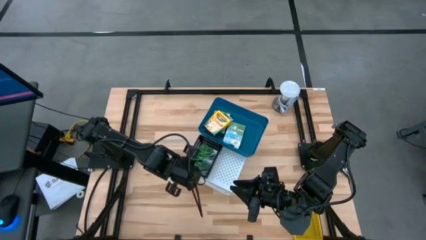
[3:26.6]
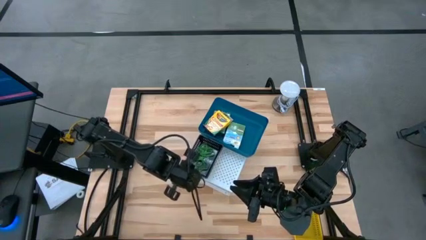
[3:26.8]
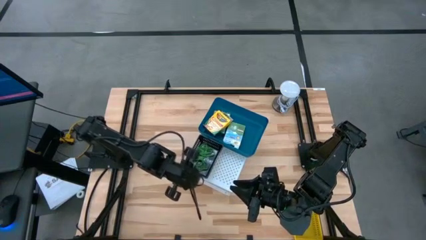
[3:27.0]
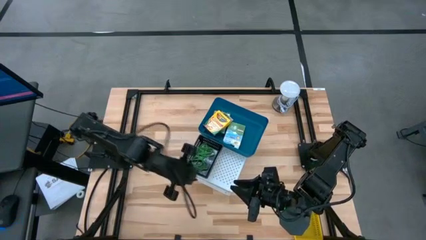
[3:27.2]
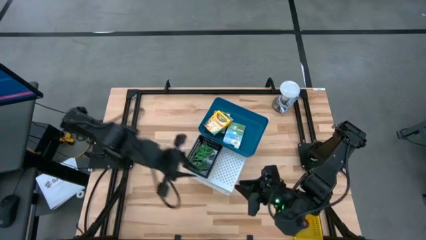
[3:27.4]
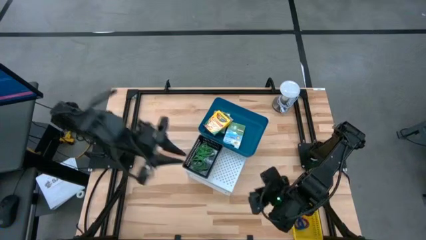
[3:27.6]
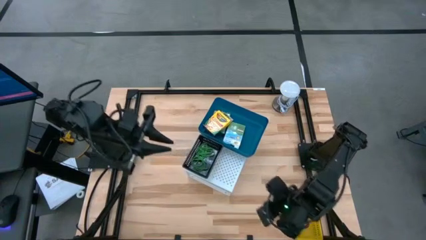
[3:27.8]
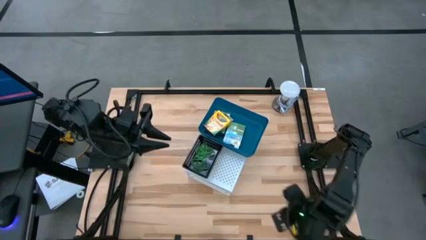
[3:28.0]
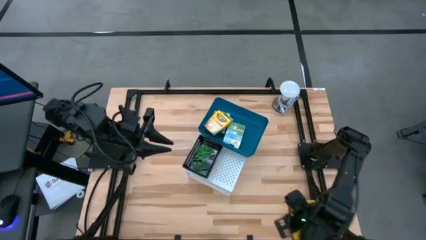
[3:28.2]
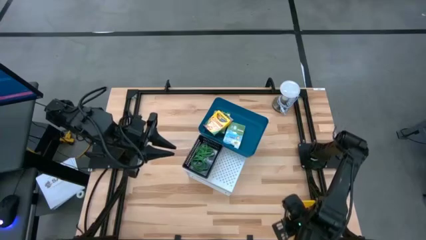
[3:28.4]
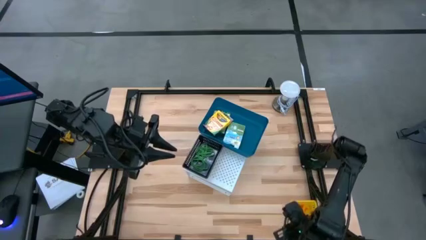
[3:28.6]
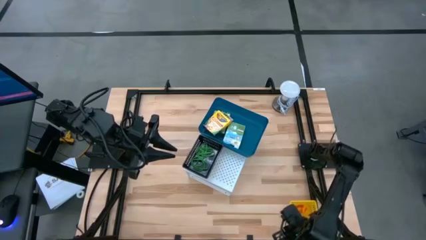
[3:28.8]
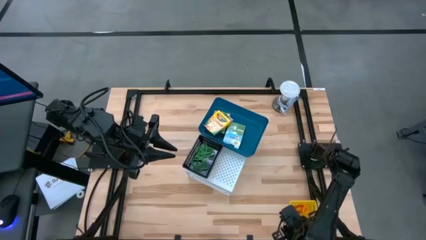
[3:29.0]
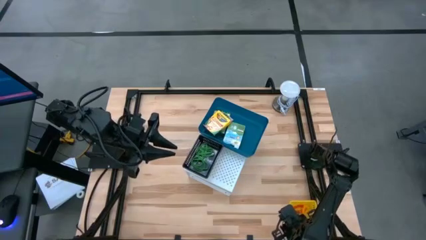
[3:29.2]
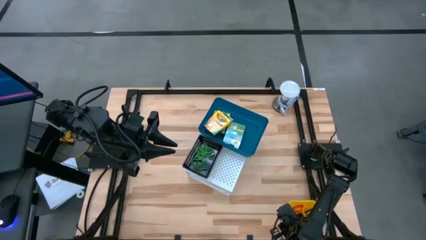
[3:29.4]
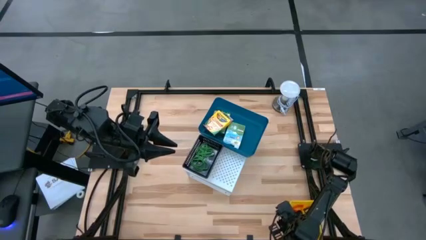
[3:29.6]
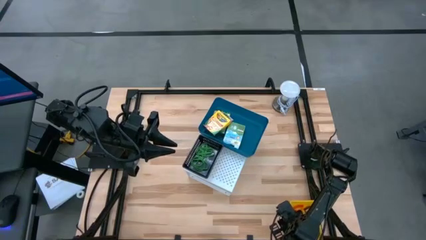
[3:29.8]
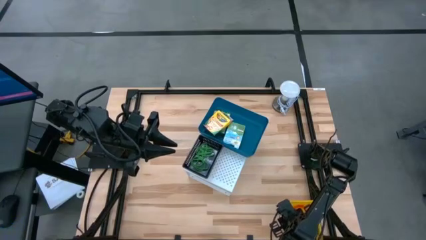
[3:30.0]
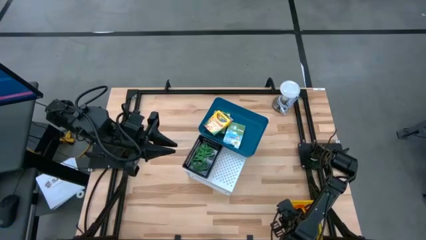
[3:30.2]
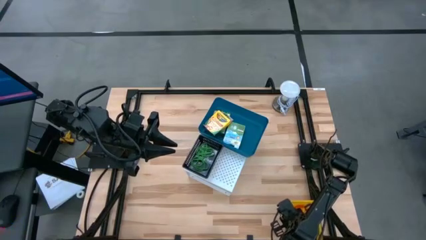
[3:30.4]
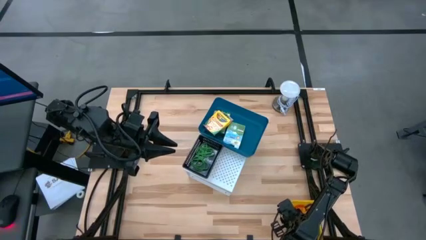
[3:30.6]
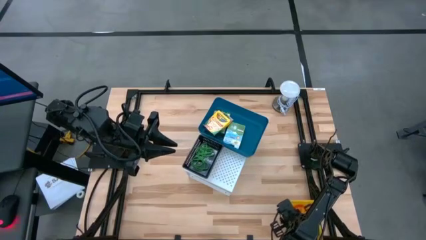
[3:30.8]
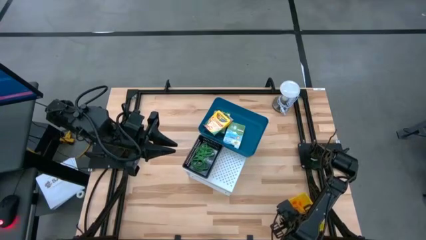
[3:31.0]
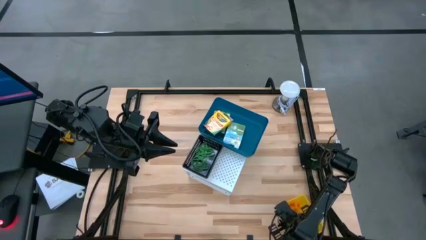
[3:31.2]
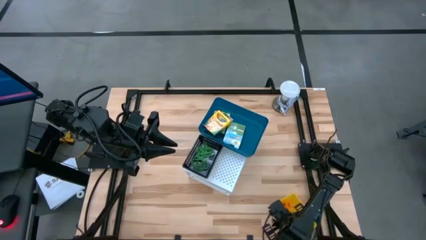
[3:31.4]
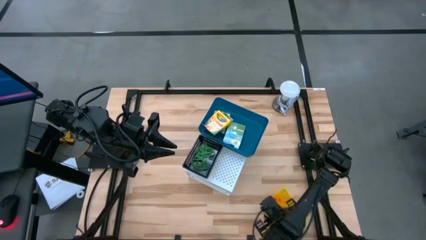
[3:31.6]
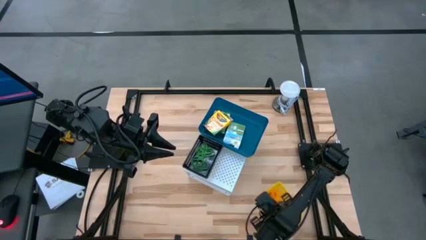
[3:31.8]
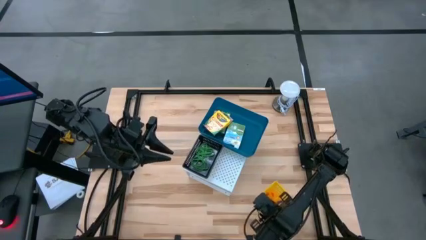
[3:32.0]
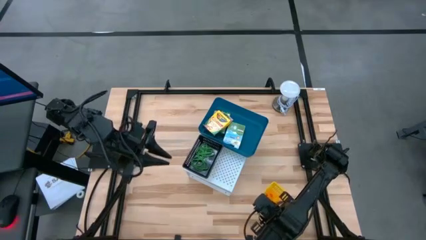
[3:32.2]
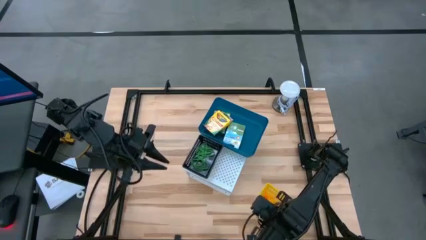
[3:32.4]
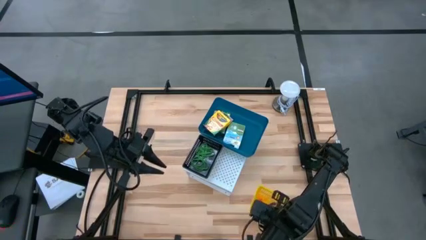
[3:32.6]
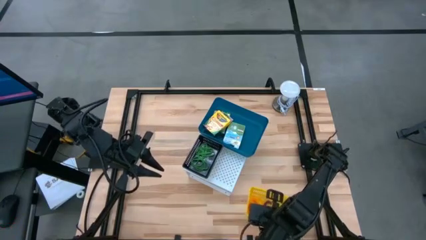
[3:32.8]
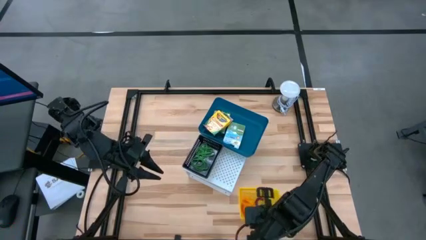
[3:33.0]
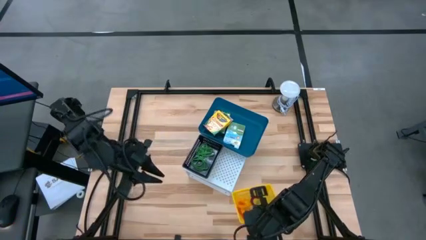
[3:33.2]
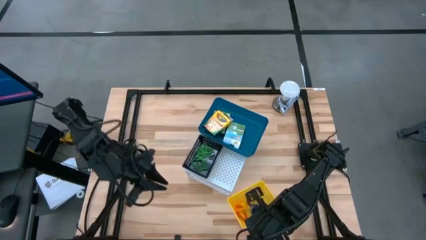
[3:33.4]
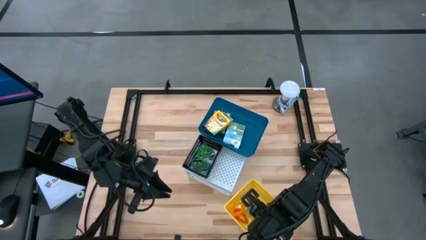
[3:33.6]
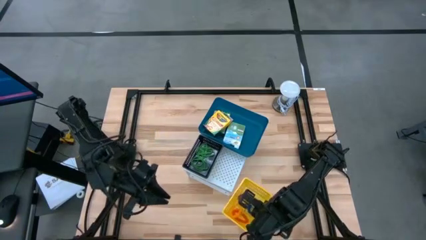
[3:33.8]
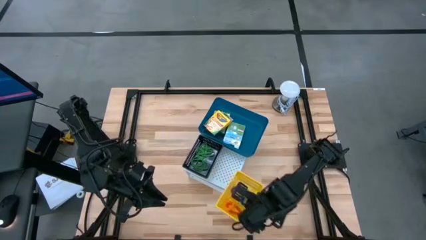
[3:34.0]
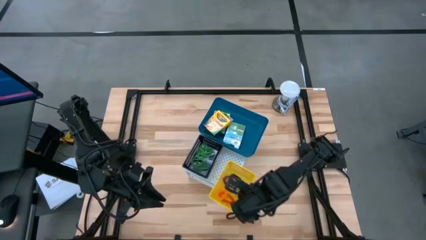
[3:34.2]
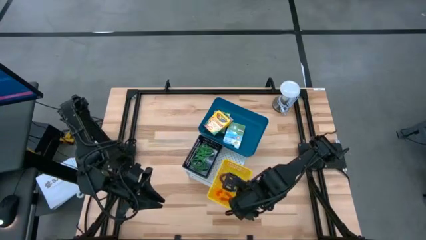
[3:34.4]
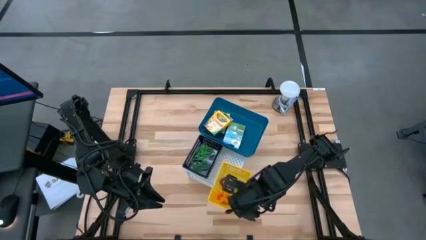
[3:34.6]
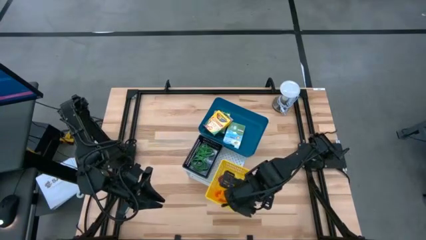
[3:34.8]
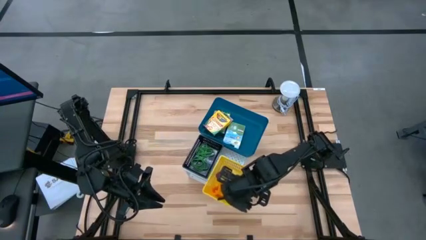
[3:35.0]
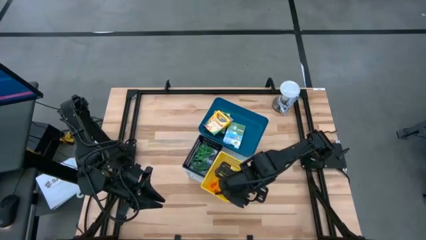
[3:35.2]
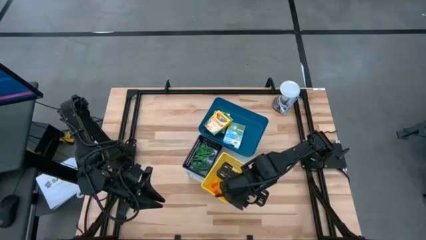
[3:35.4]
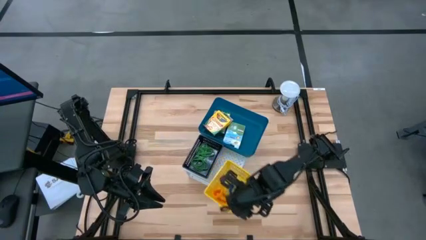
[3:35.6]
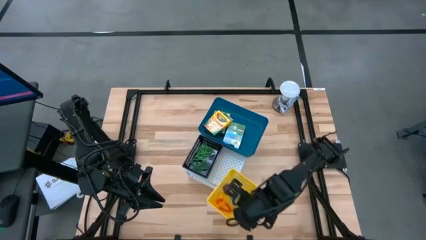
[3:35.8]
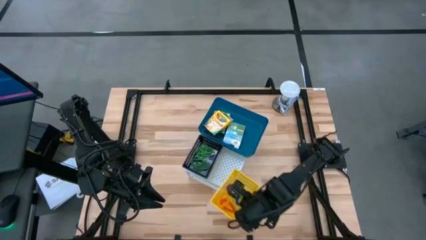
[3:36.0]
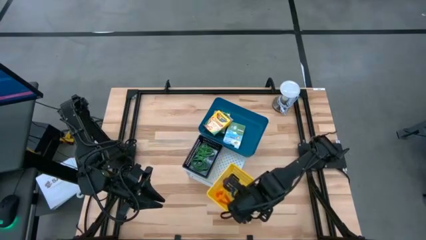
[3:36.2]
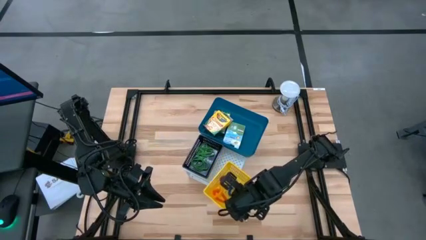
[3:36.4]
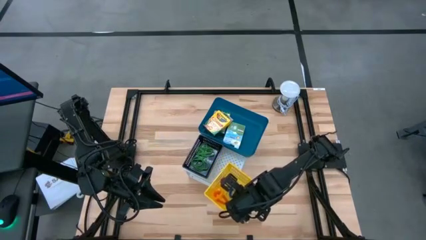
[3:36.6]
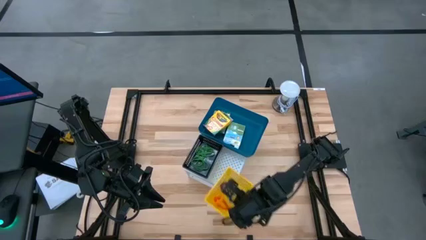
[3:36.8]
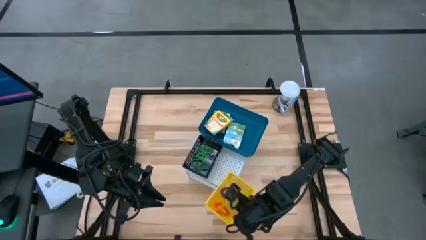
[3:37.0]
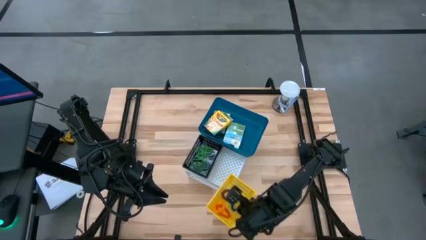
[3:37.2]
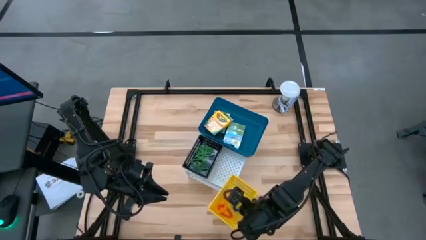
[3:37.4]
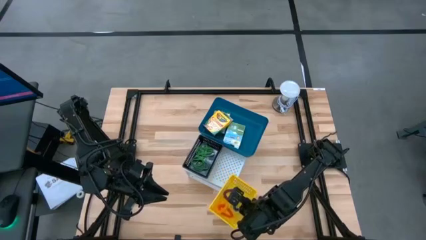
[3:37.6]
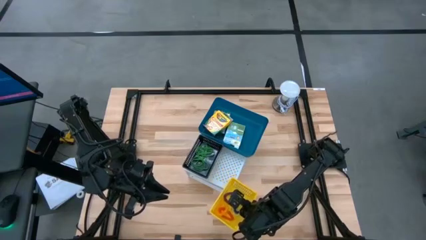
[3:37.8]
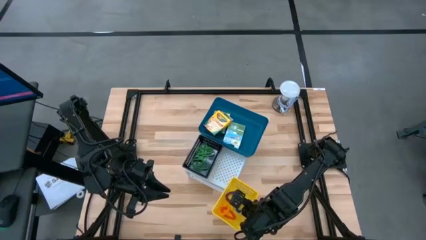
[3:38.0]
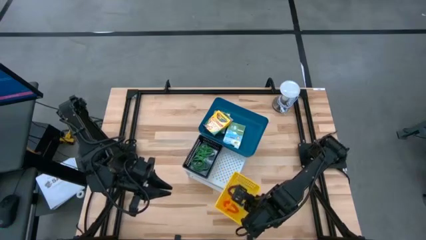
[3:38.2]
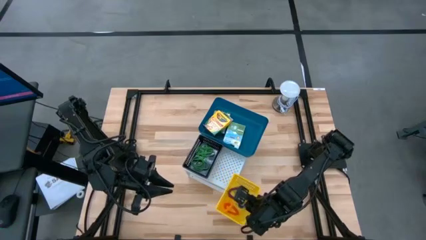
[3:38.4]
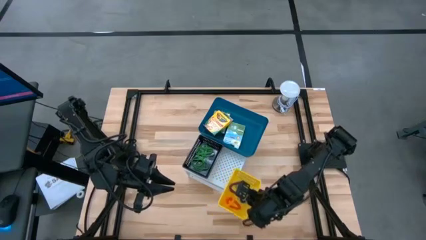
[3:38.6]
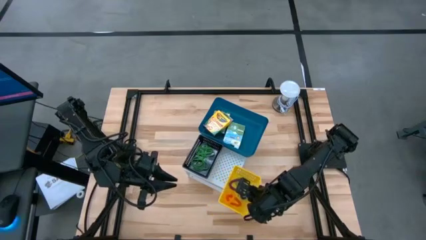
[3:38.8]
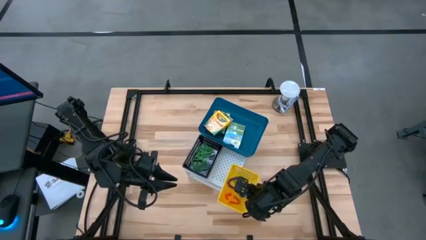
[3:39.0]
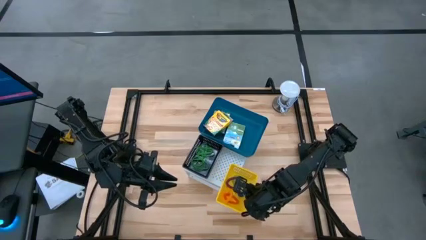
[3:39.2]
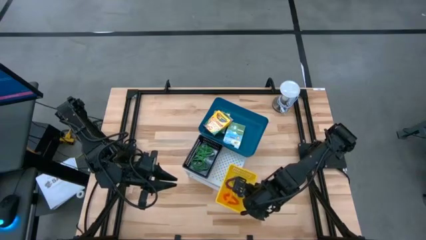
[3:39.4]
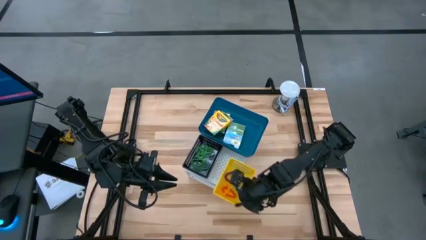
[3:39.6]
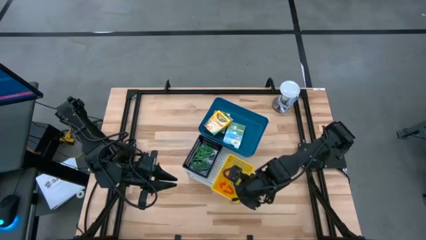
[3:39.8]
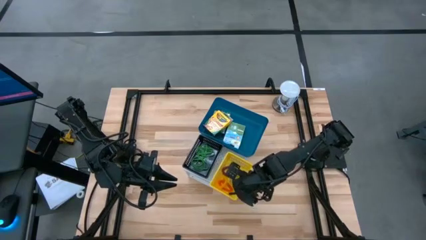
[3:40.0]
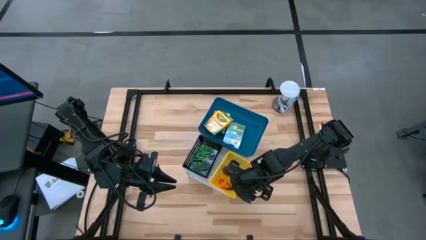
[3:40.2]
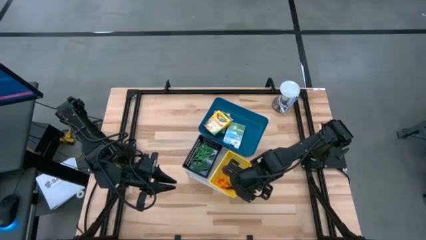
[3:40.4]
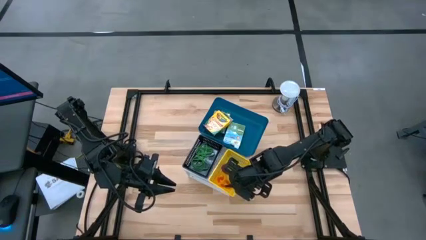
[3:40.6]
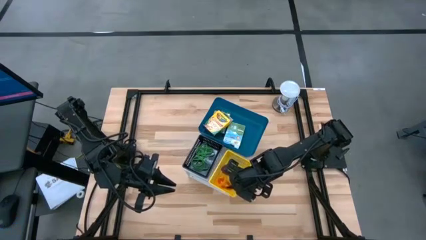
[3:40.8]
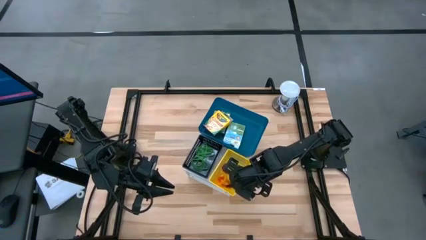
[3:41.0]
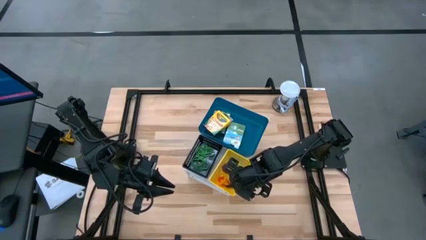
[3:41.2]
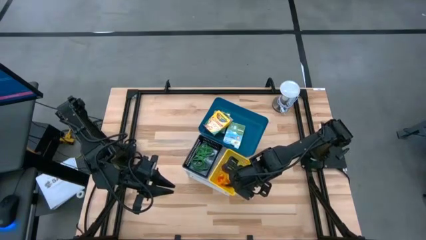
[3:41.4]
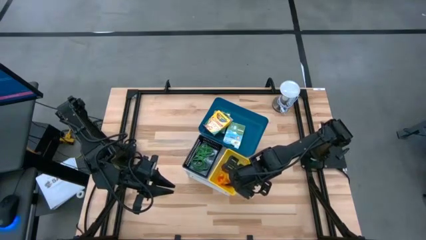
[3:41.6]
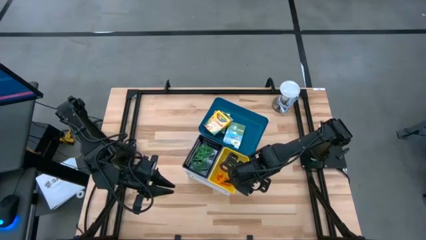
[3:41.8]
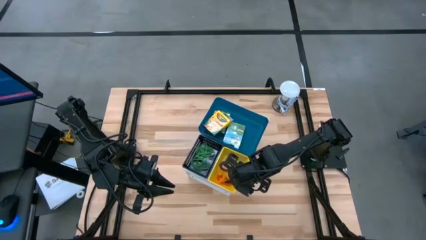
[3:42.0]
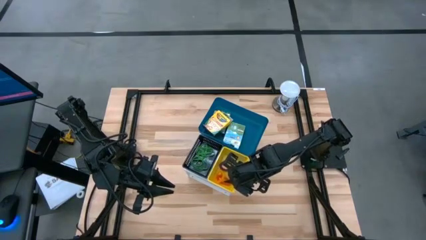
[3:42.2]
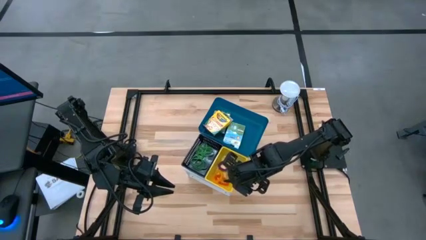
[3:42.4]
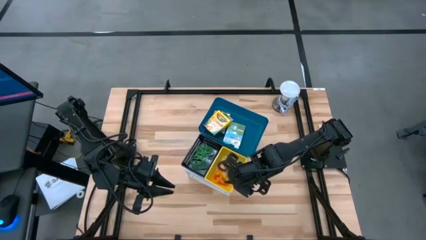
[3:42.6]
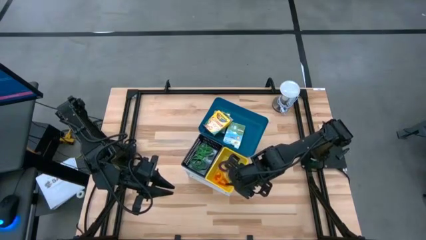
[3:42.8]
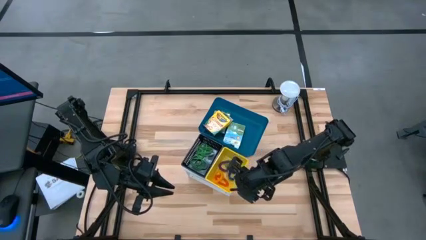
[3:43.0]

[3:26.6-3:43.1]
Task: Pick & Place Office Desk Supplies
Put the yellow bin on the shelf
